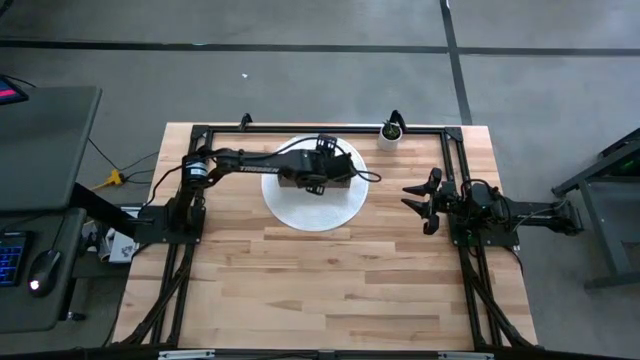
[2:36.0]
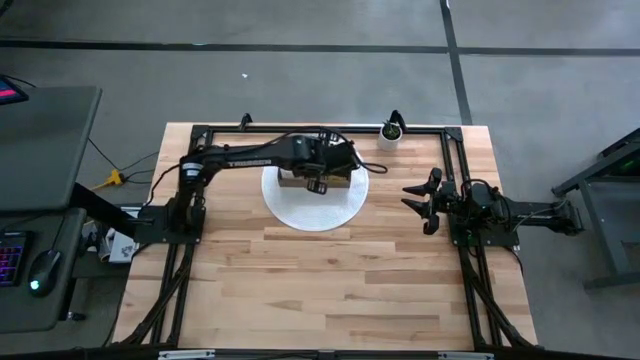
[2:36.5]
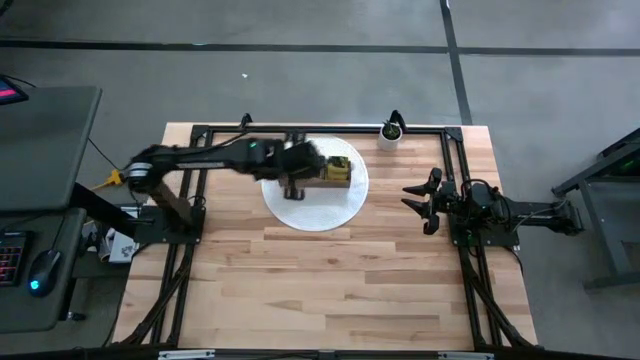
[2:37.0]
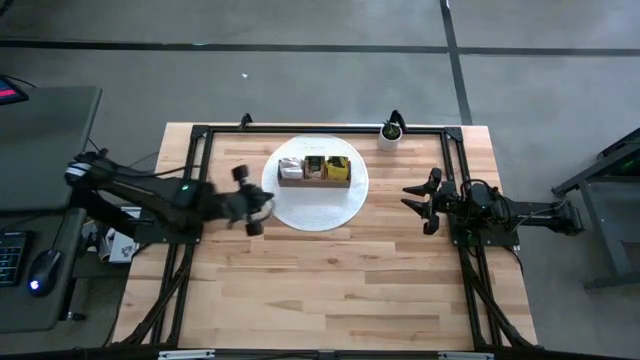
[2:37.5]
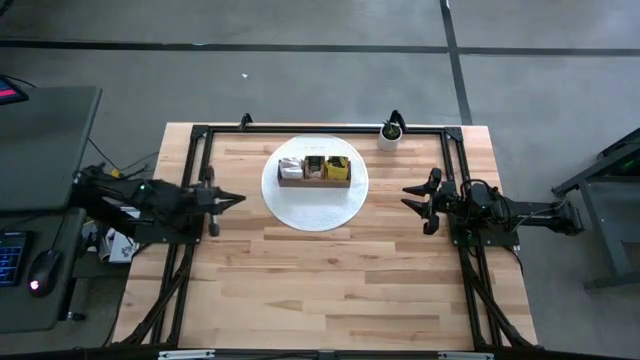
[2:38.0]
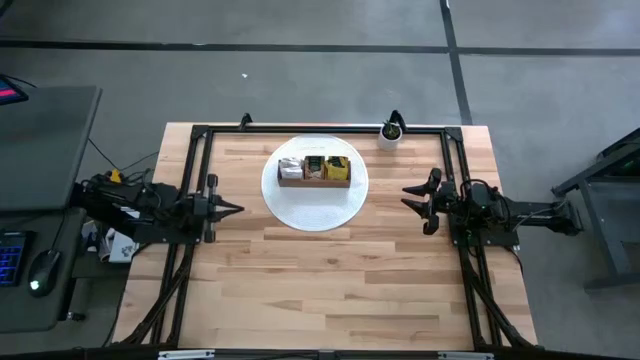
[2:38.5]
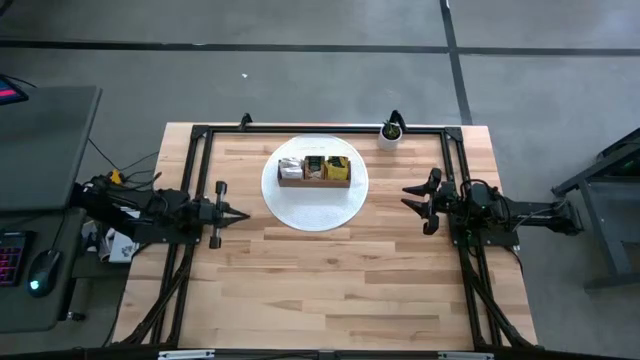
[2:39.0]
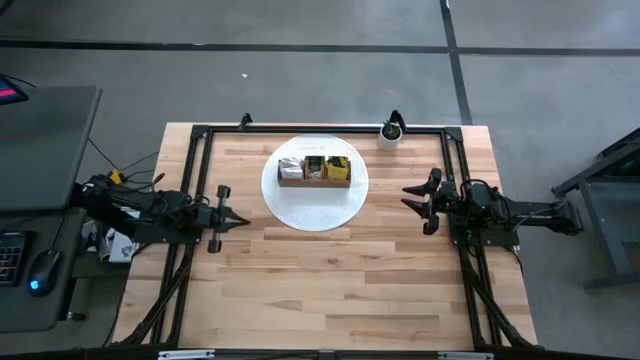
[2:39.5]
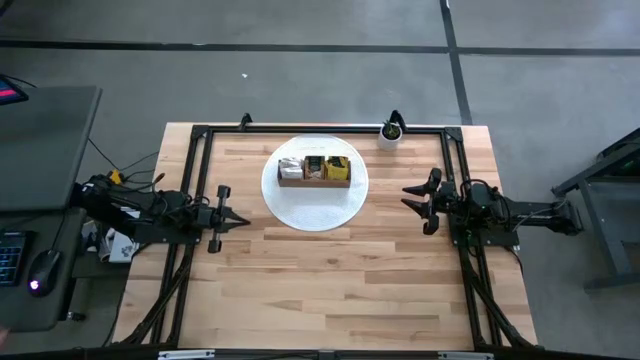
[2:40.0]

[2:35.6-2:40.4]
Task: Pick & Place Tea
Return to Home Position

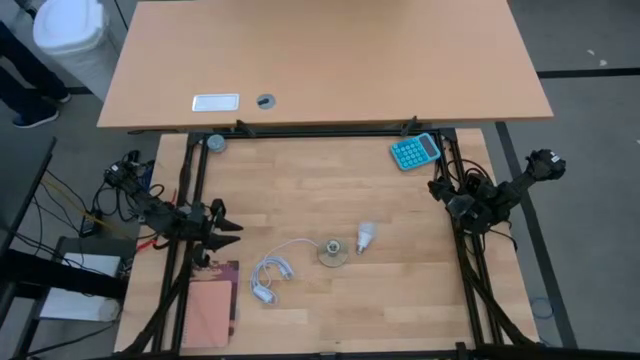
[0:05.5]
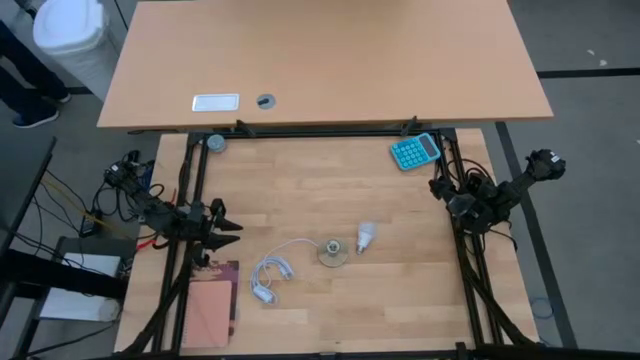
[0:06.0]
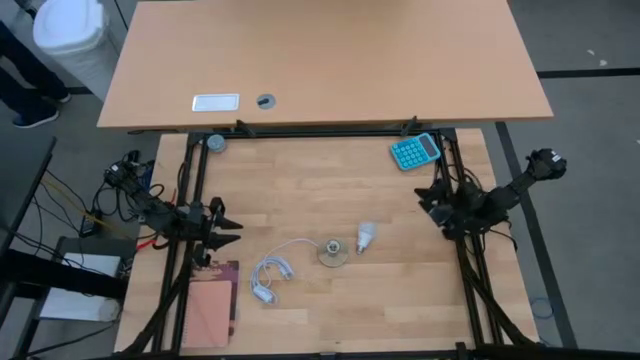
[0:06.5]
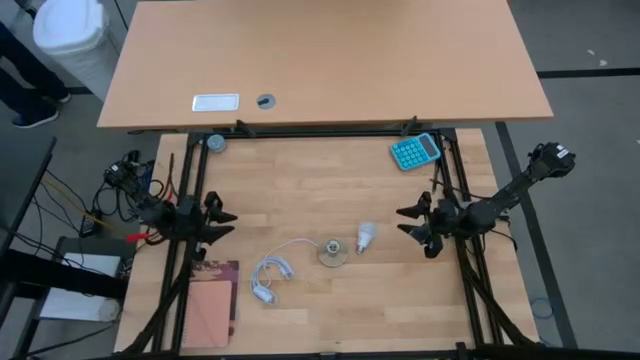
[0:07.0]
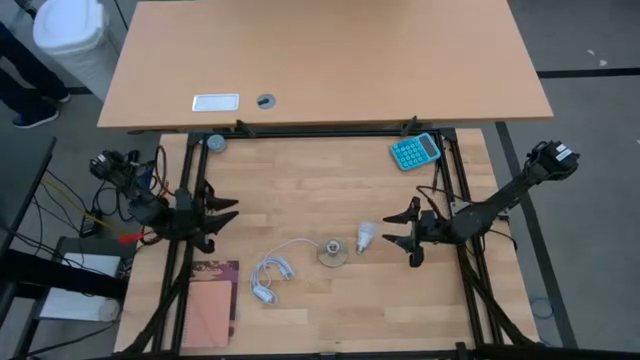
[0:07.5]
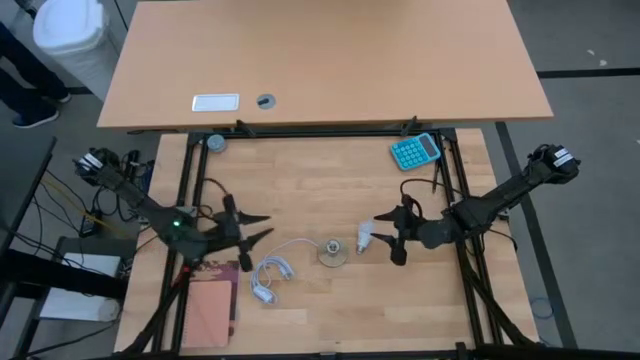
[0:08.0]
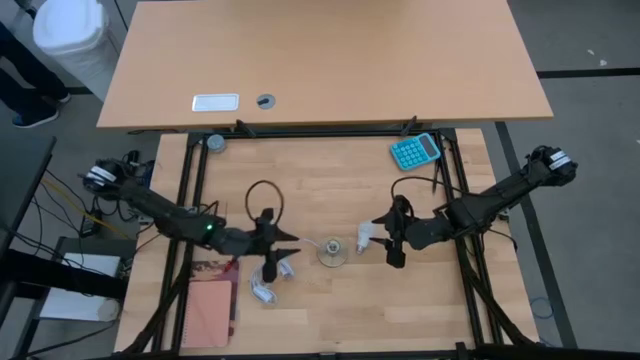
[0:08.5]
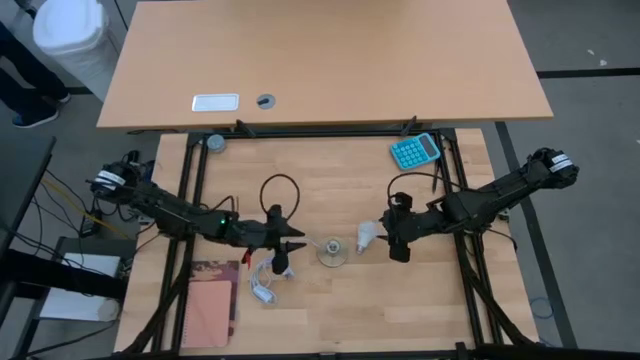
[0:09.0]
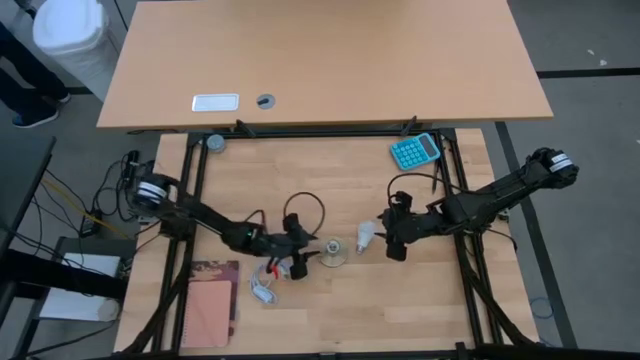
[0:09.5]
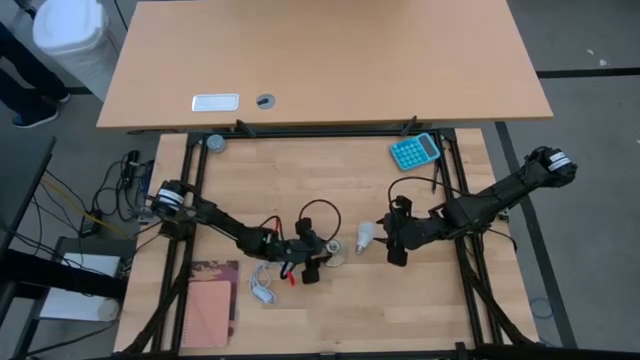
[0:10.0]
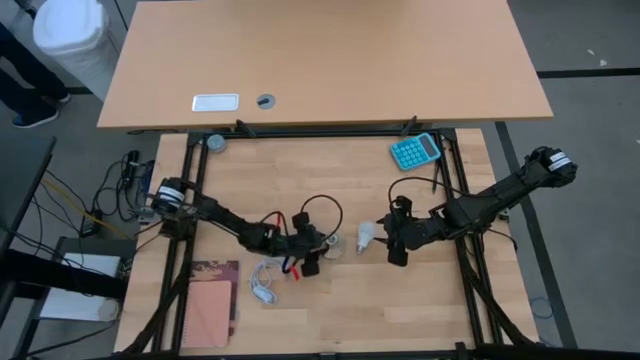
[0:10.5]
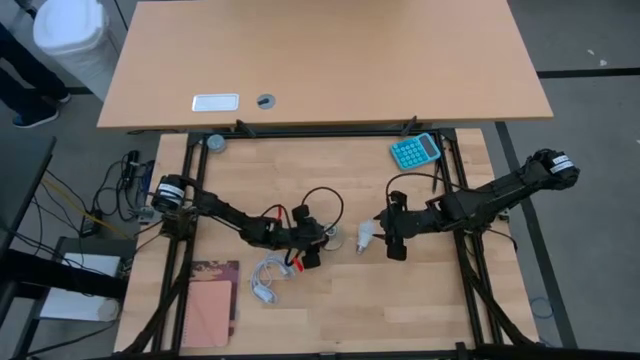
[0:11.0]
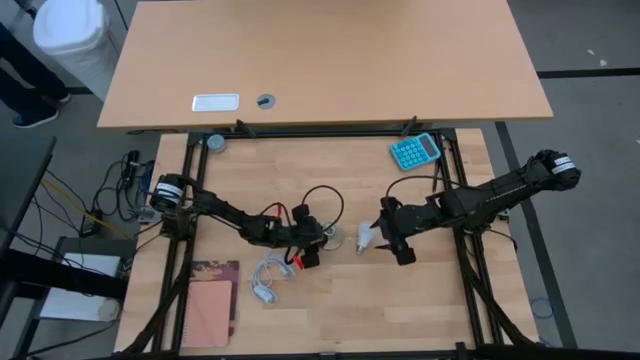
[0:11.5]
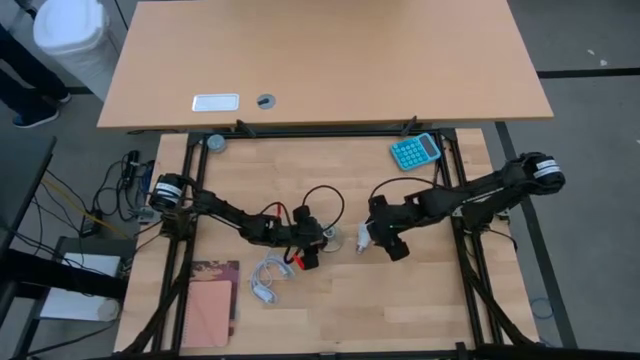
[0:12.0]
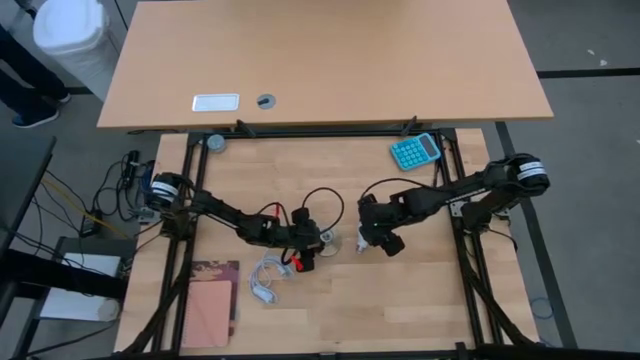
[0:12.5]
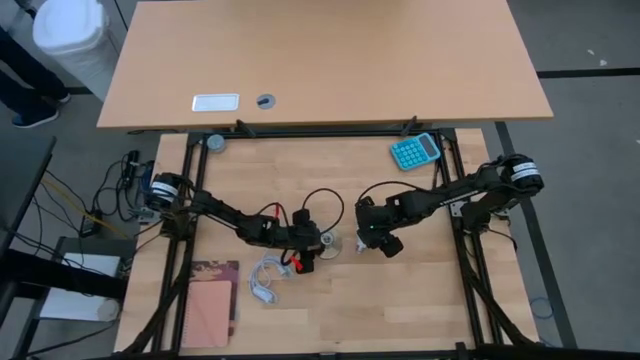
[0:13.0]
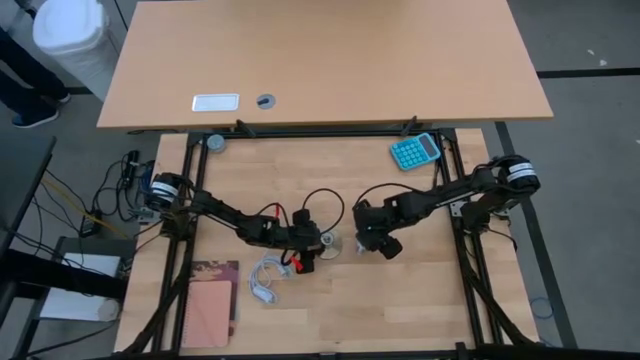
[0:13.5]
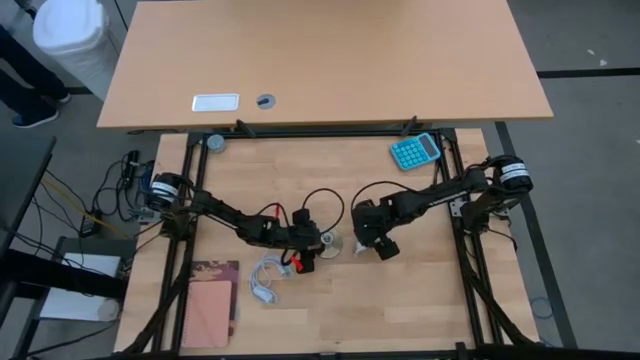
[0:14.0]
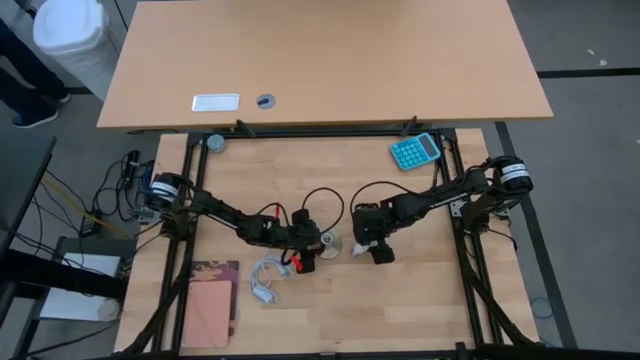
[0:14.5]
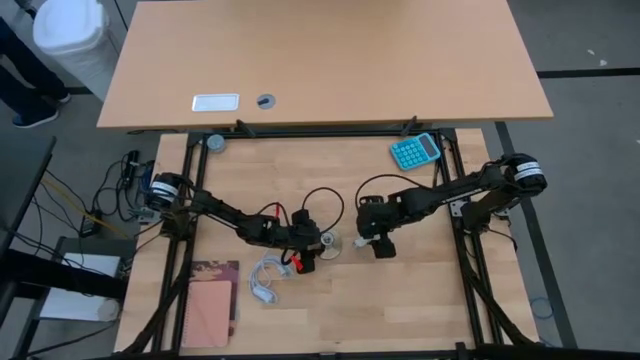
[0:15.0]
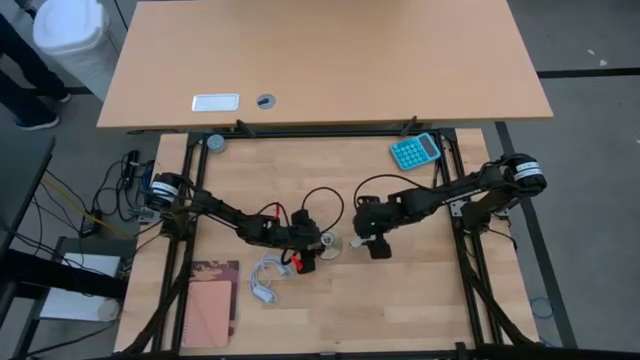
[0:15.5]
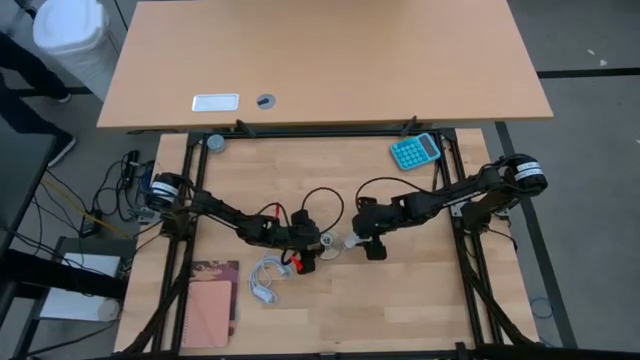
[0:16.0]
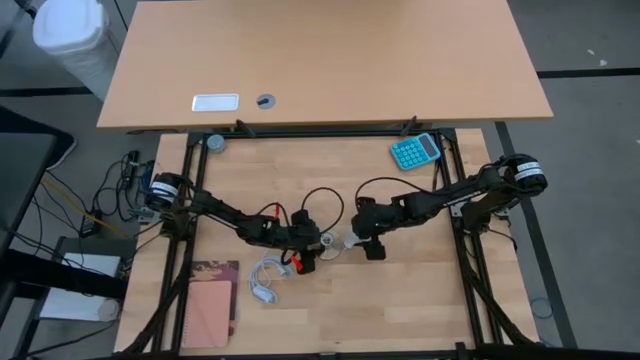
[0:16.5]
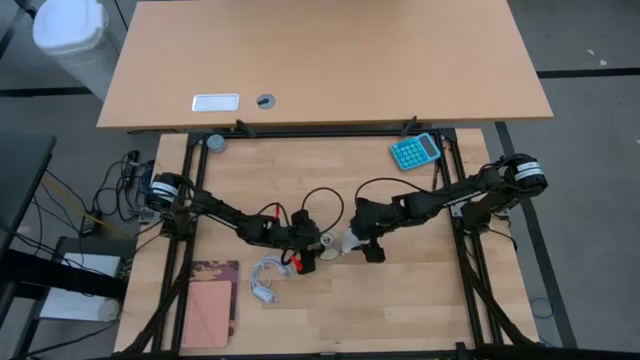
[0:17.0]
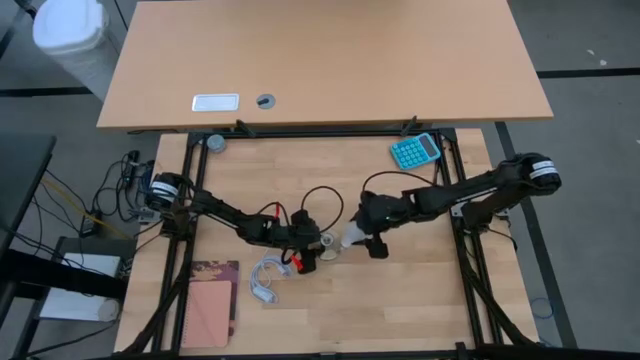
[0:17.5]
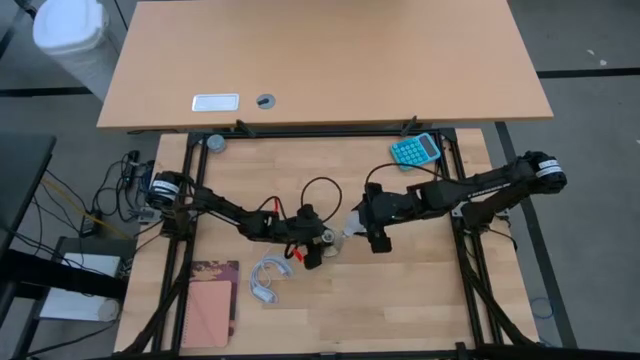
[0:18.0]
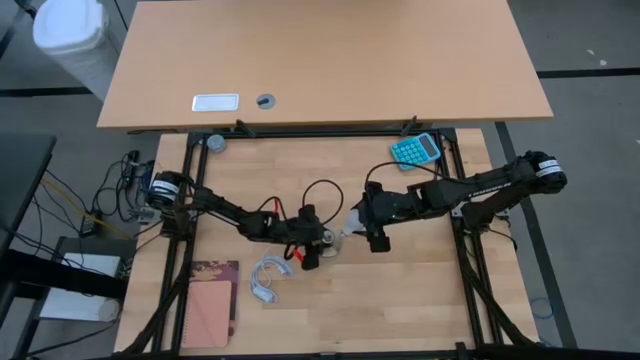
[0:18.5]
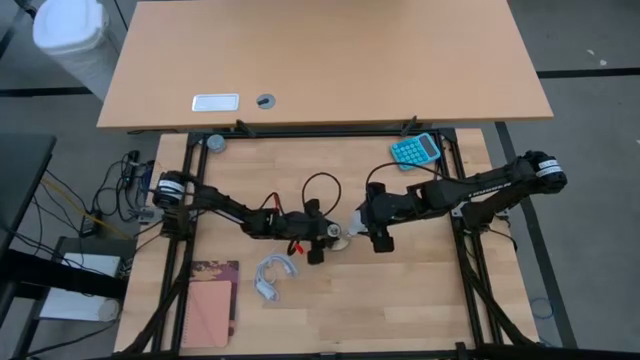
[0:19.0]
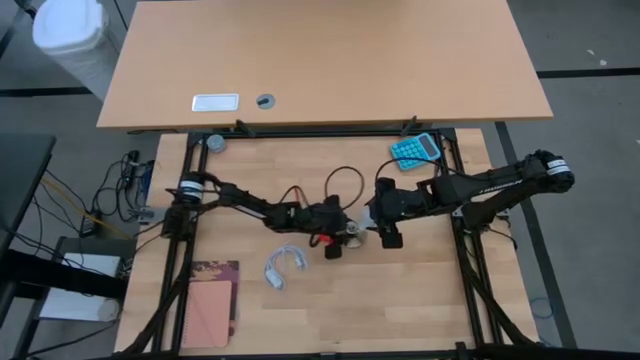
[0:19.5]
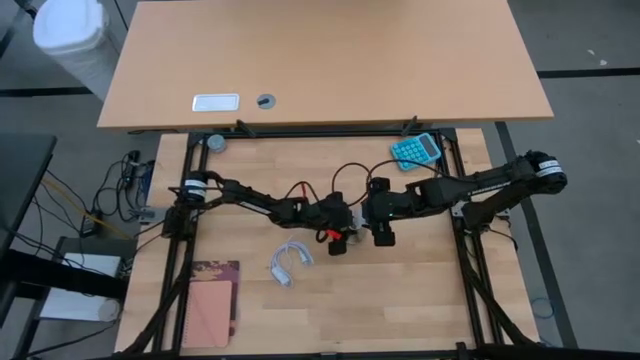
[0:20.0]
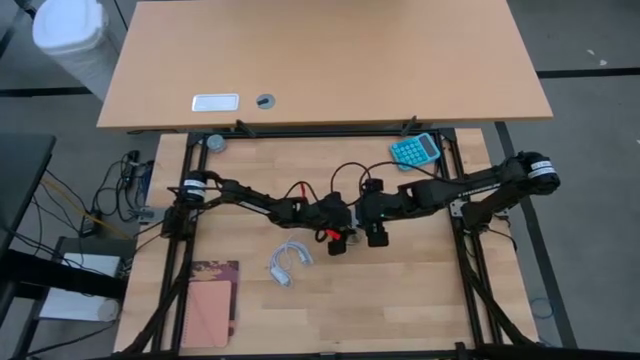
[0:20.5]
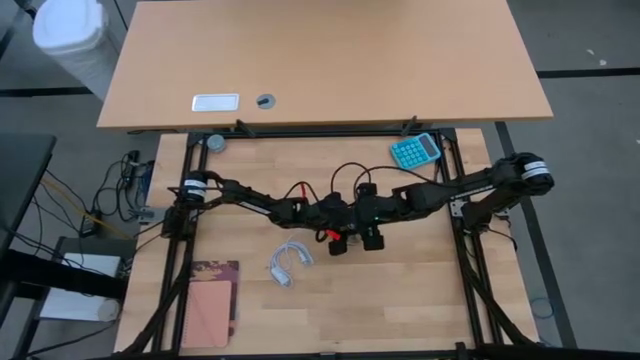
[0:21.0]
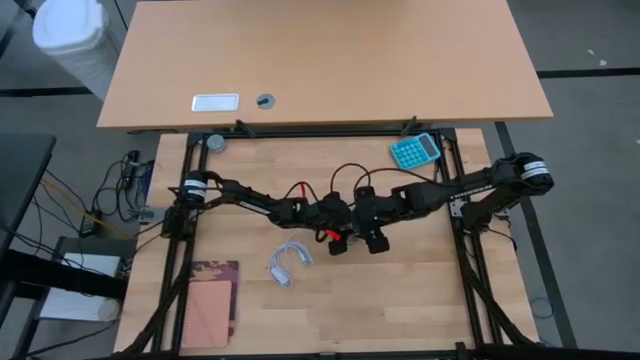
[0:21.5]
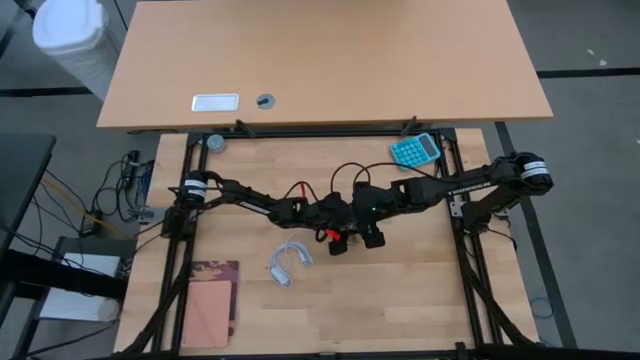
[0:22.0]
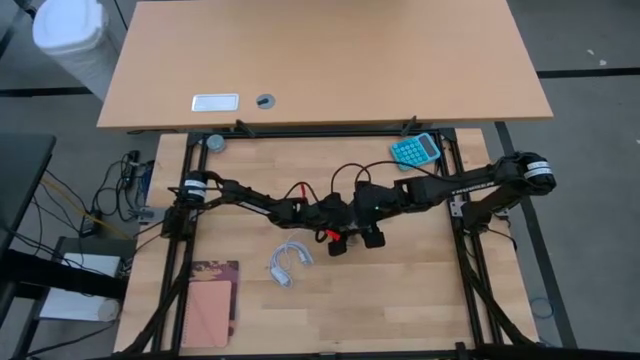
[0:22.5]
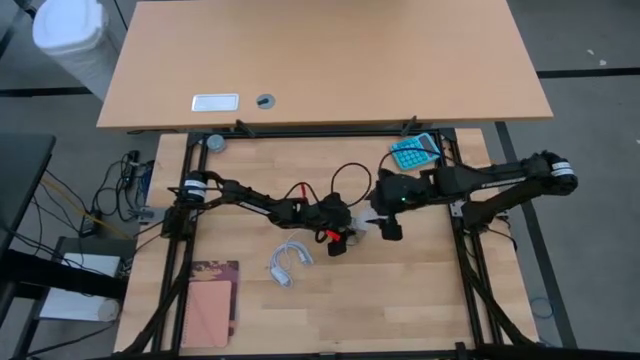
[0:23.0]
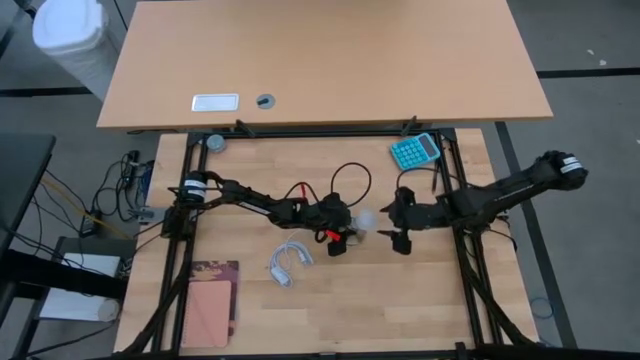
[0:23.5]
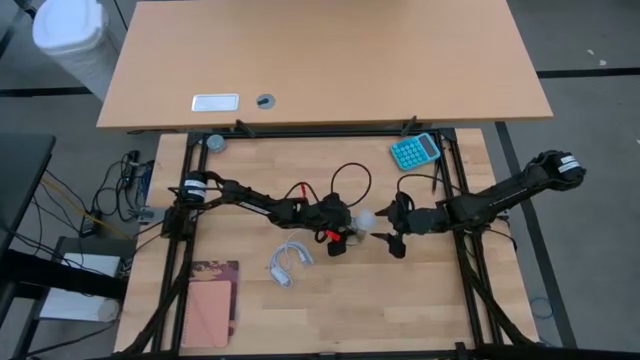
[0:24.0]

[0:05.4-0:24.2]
Task: Screw lightbulb
Insert the lightbulb into the lamp socket
